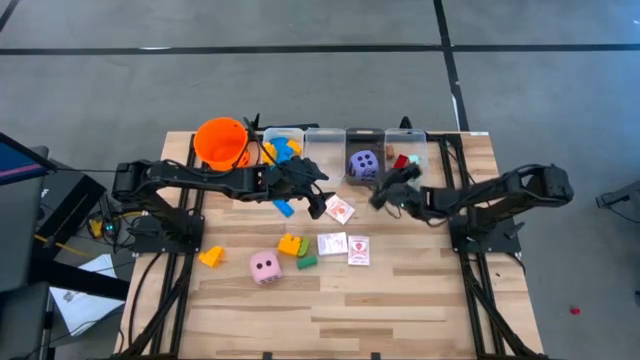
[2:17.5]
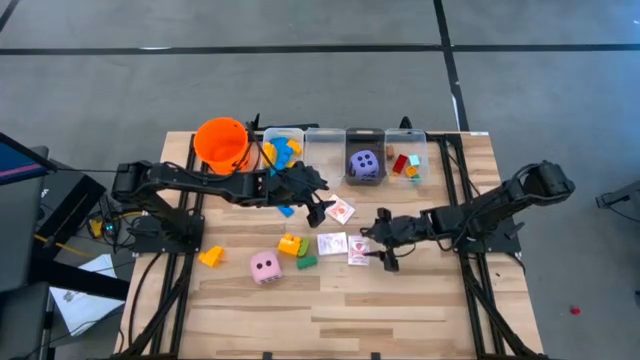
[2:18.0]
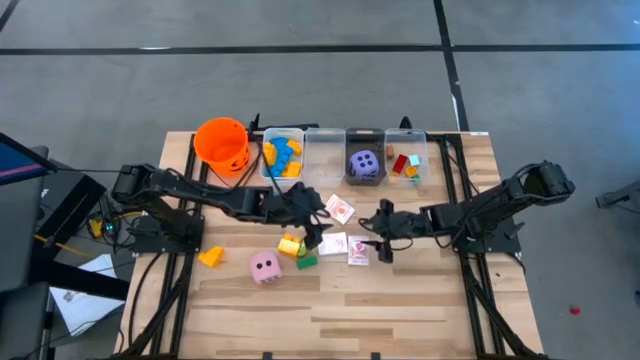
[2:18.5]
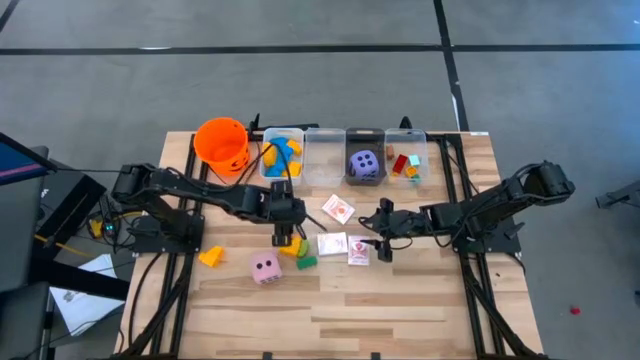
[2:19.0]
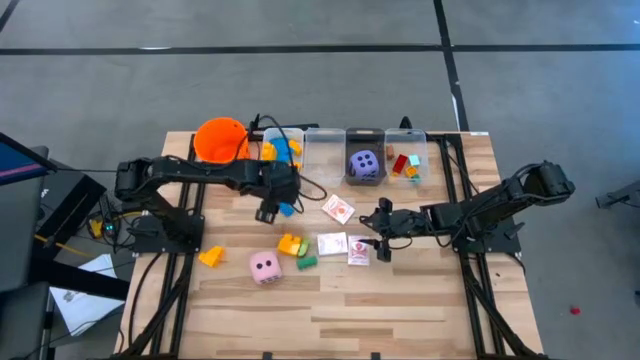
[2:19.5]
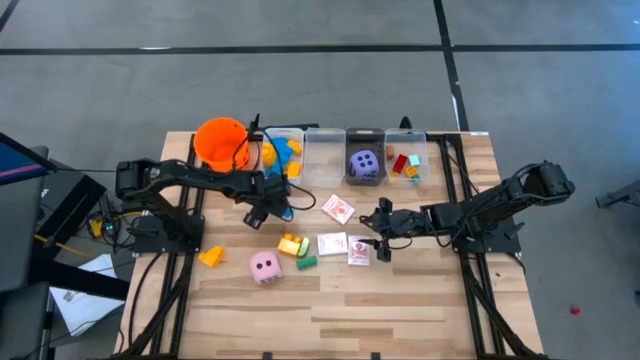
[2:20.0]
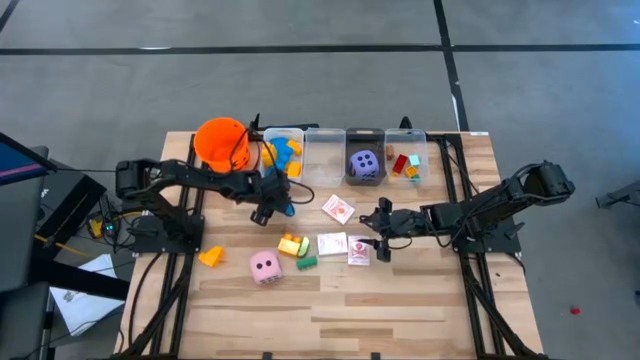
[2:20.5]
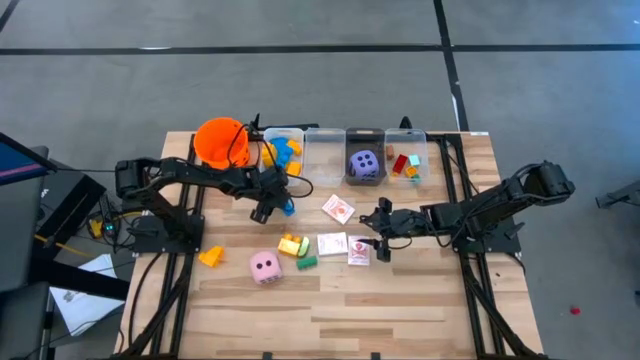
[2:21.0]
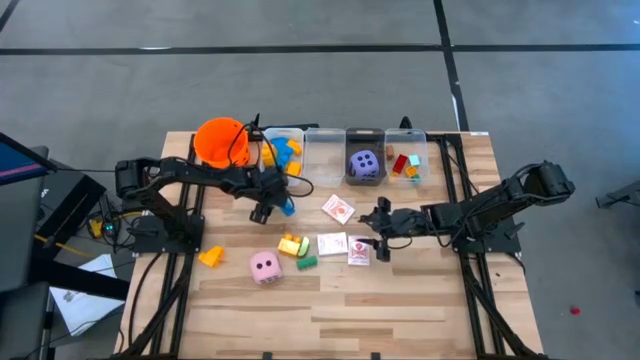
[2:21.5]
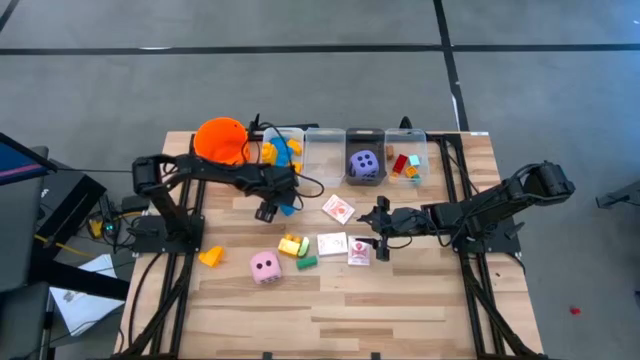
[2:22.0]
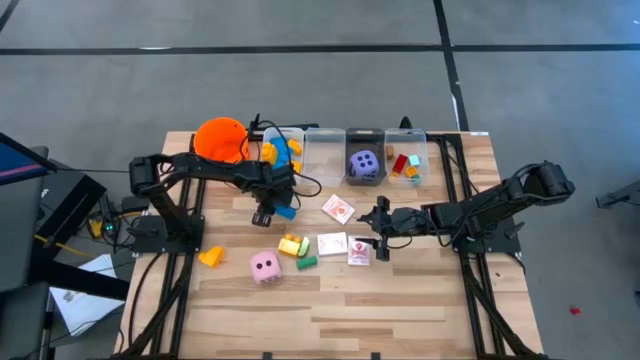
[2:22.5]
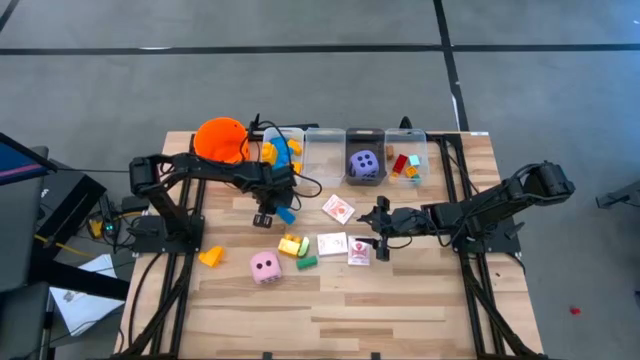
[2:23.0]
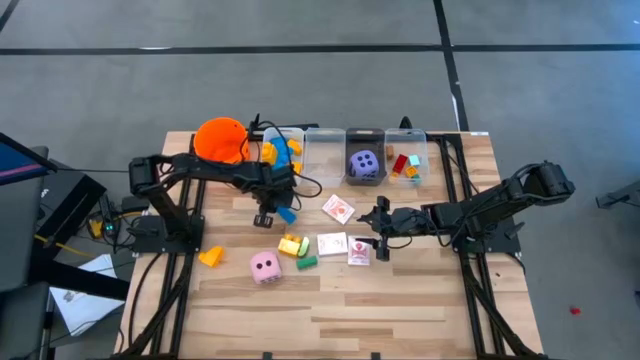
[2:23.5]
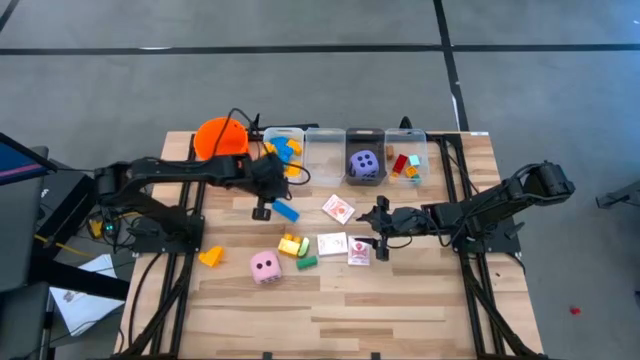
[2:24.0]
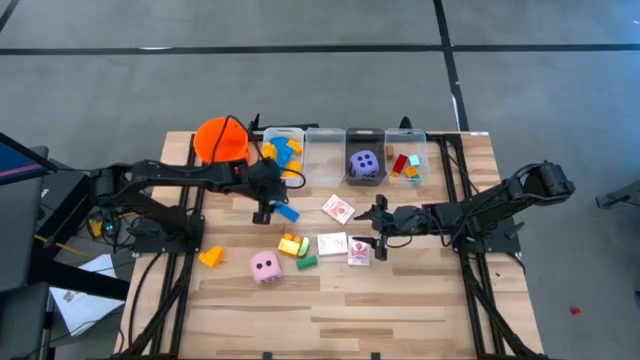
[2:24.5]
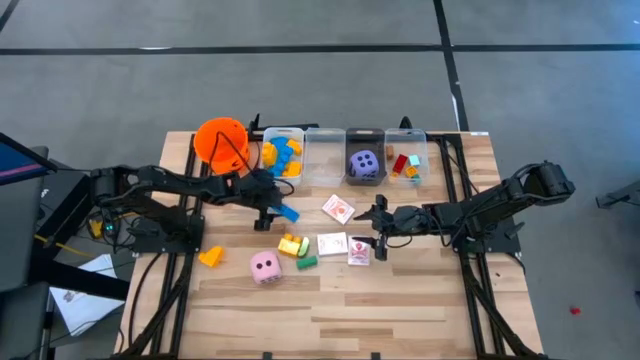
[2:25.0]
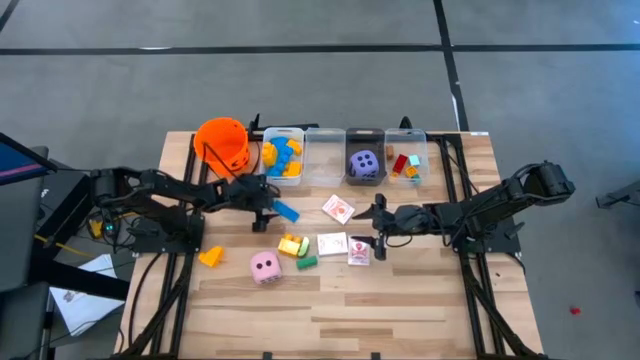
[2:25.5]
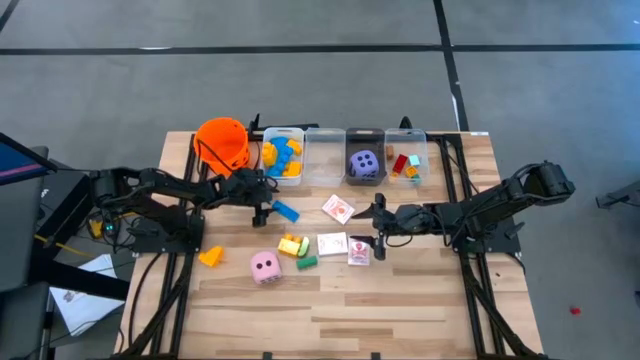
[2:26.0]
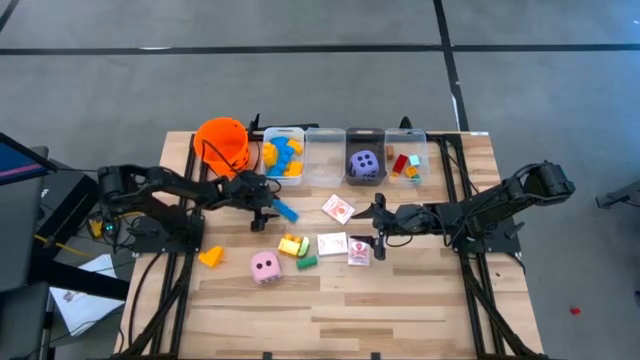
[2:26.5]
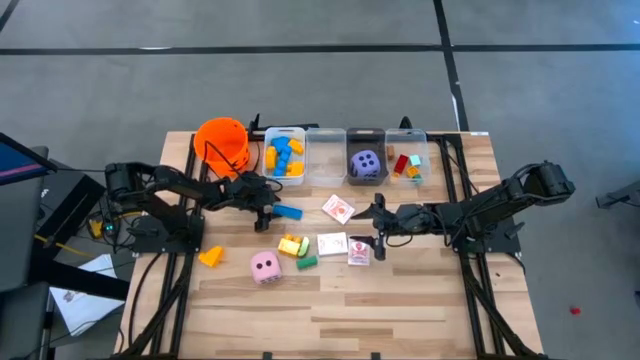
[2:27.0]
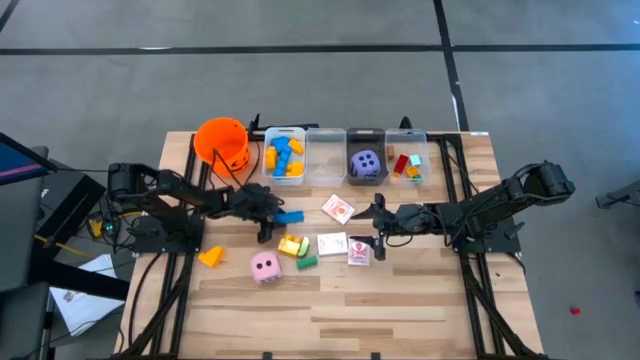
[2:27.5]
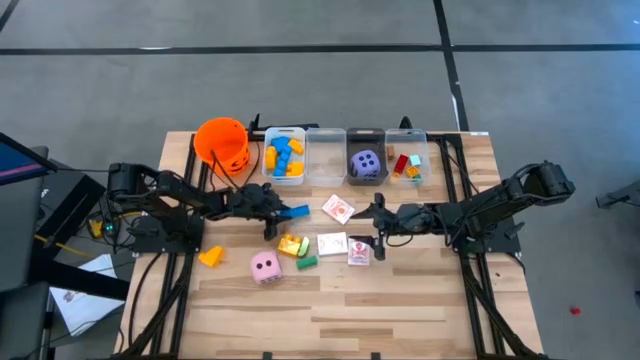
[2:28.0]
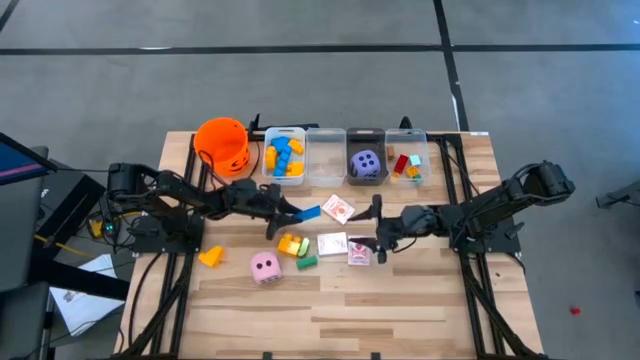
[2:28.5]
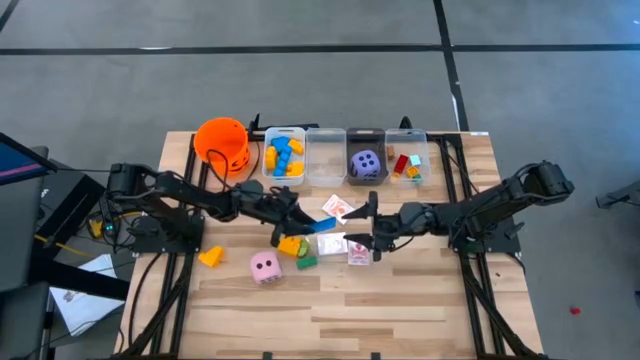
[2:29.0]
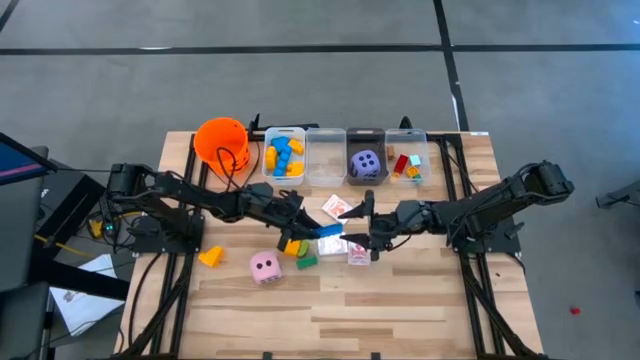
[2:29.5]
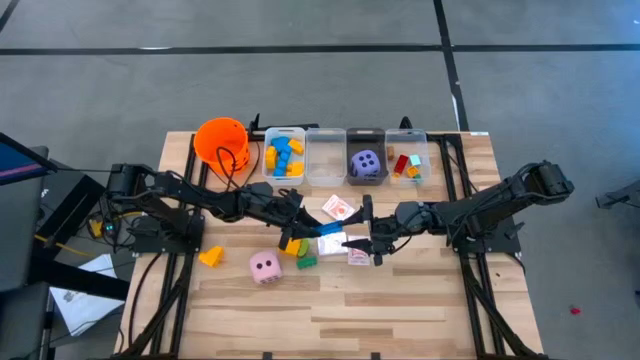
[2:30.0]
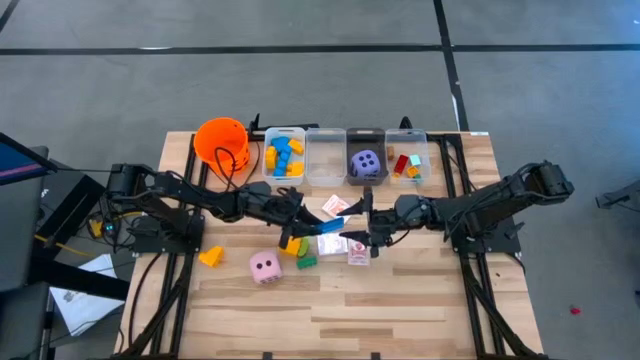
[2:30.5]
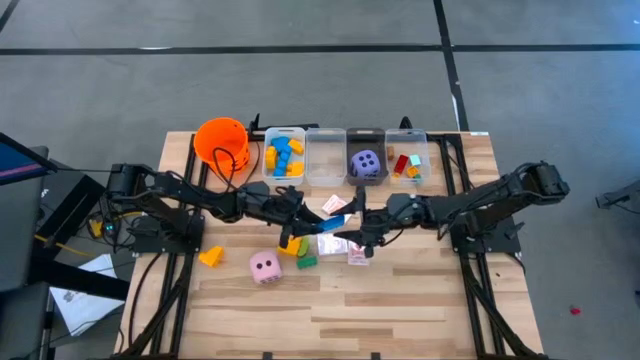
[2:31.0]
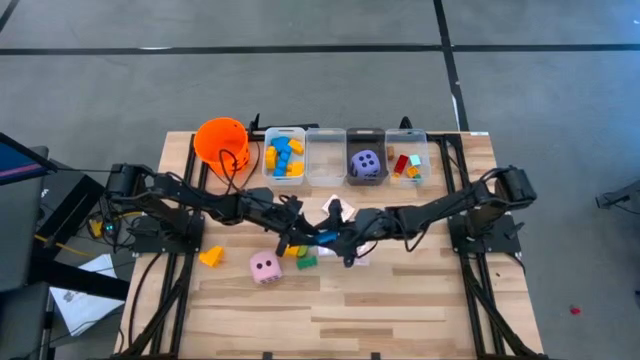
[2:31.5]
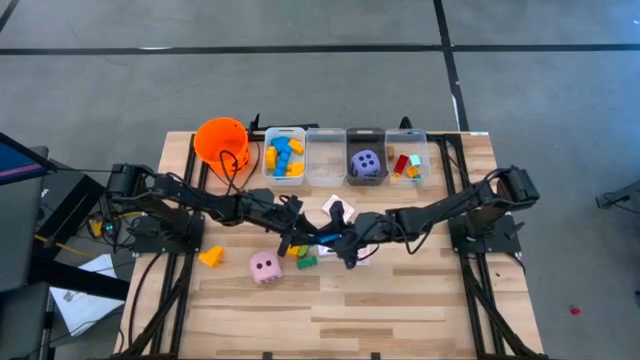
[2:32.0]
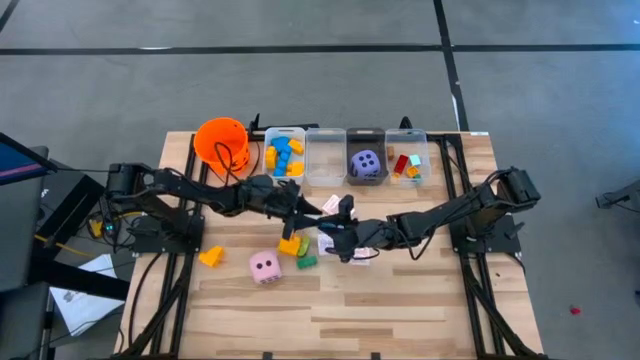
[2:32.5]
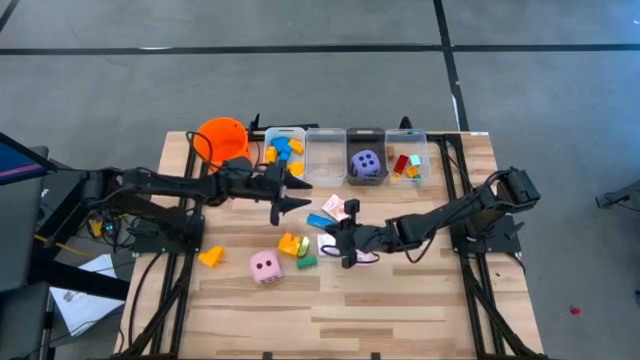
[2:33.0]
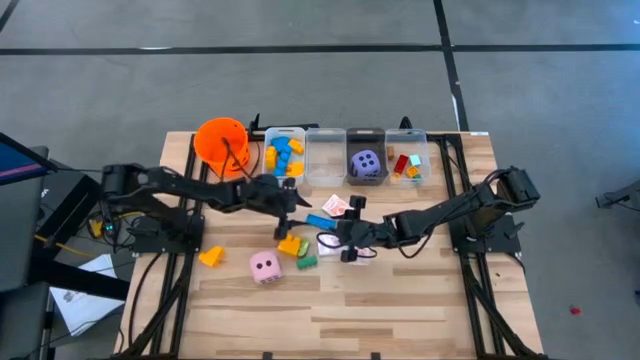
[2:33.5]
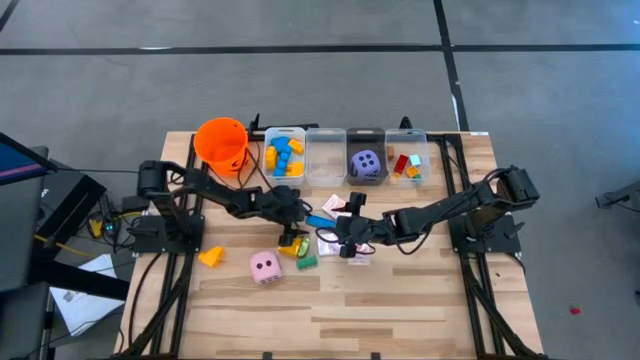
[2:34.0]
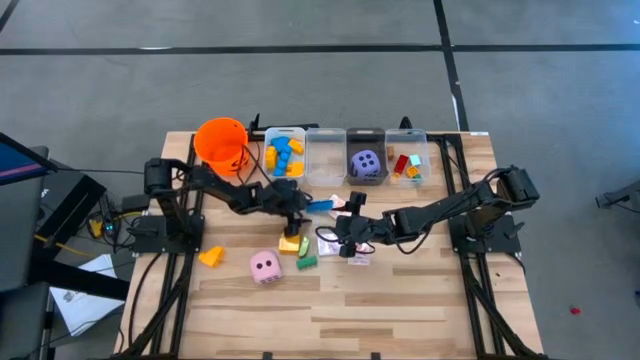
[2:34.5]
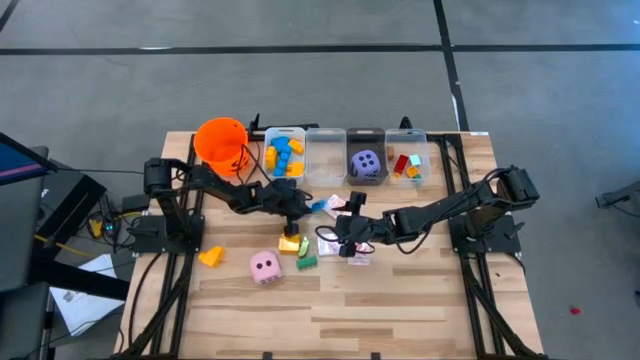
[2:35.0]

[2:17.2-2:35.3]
Task: Pick & Place Toys
Put the small blue game piece into the right transparent bin

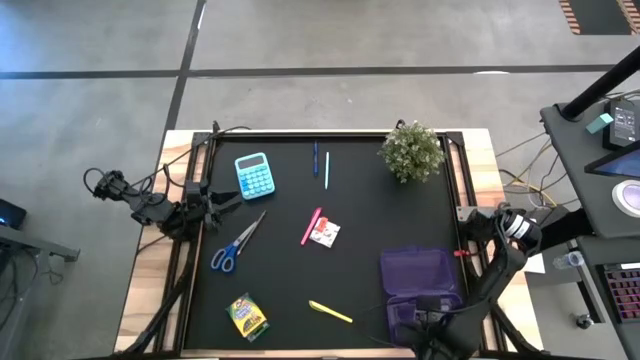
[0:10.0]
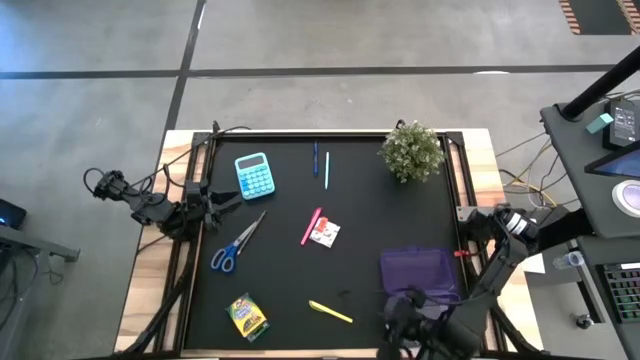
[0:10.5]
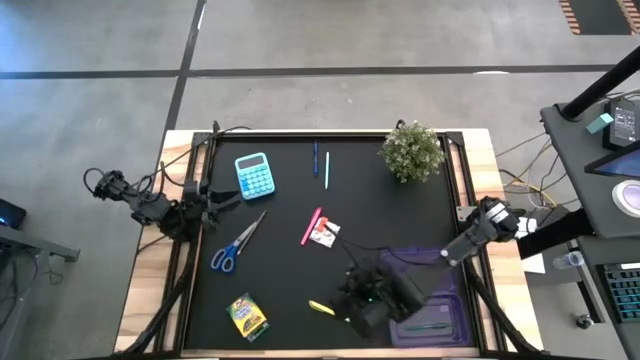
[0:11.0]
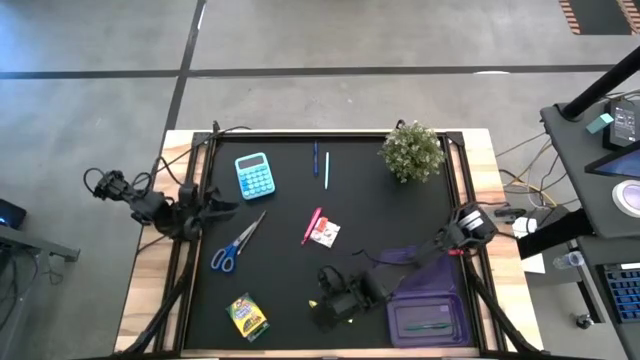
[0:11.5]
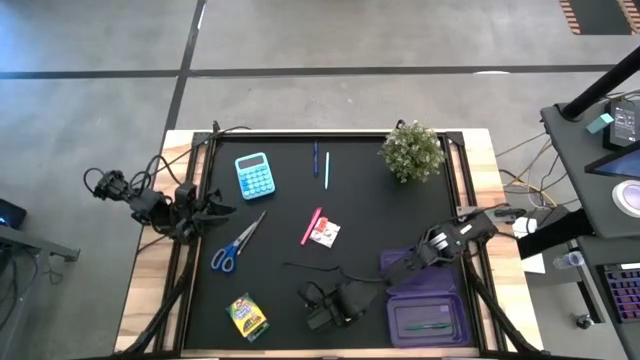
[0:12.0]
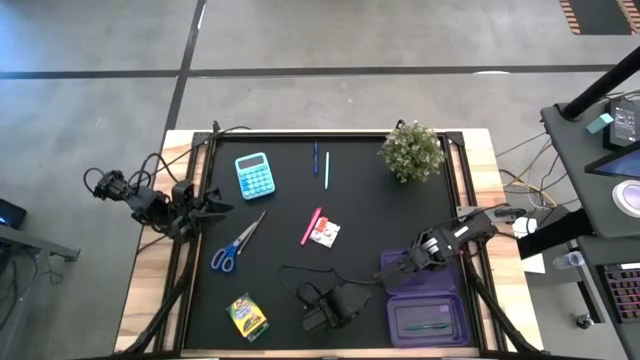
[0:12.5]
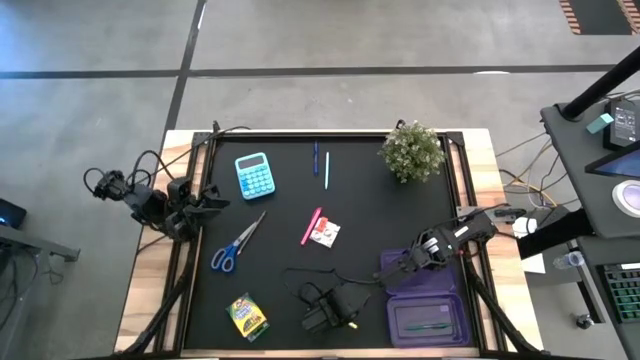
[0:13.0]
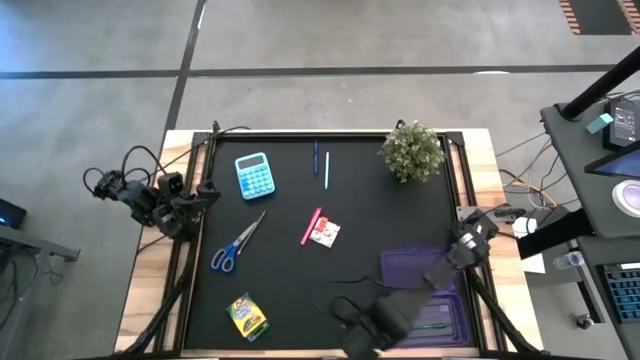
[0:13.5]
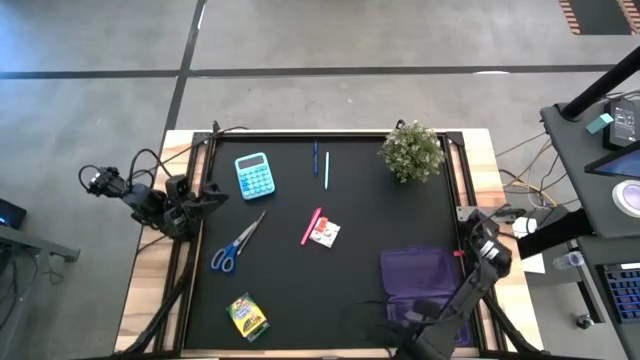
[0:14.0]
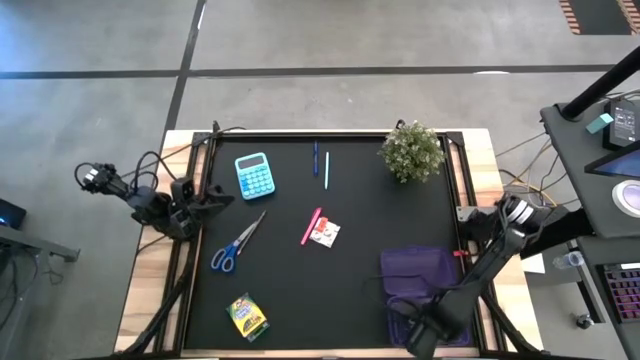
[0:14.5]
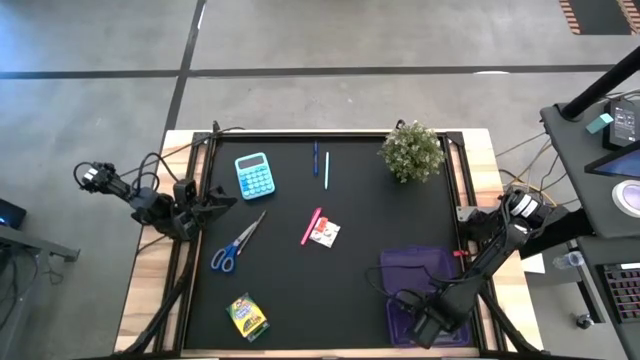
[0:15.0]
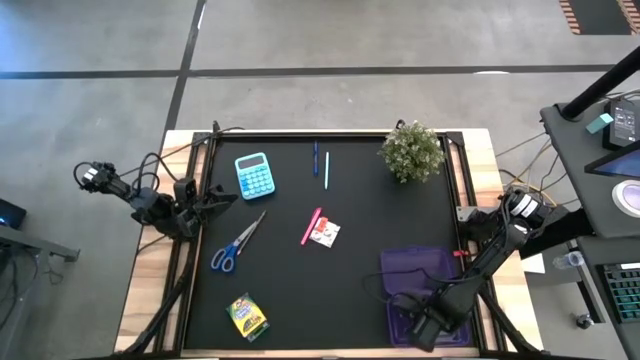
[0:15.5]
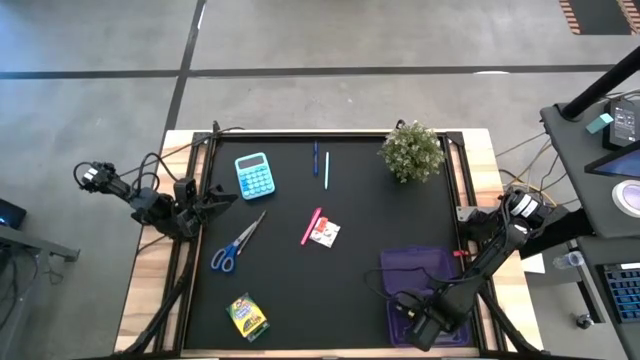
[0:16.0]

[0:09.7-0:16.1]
Task: Pack school essentials
Put the yellow pen into the purple supply box
